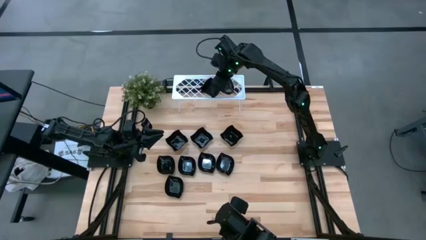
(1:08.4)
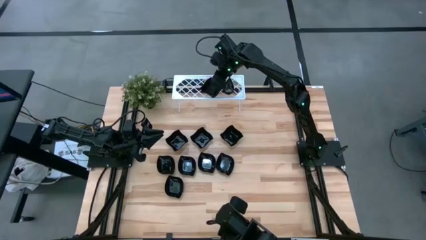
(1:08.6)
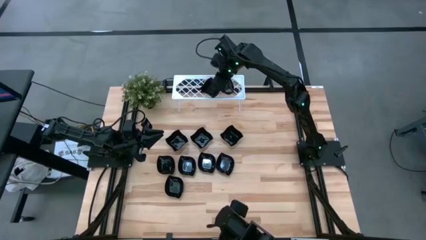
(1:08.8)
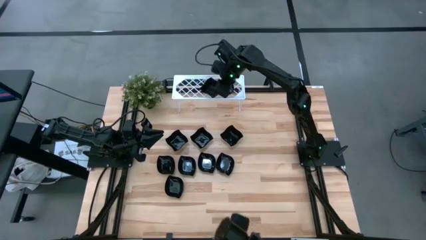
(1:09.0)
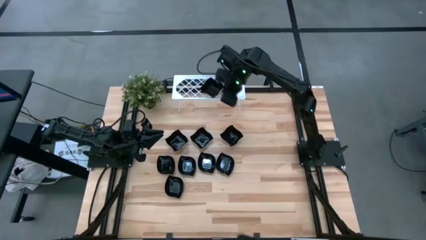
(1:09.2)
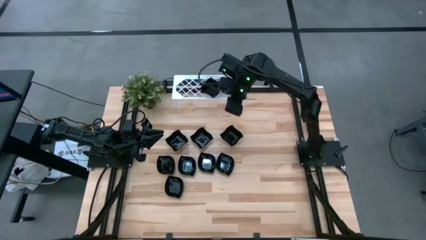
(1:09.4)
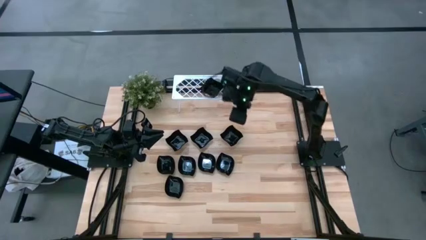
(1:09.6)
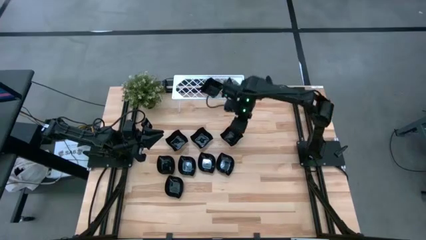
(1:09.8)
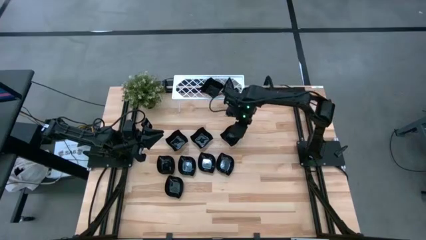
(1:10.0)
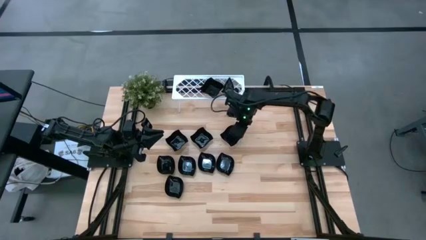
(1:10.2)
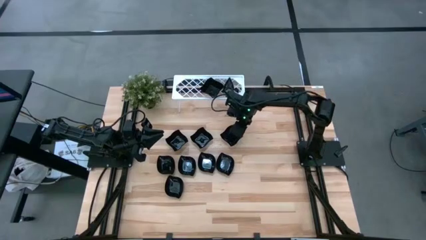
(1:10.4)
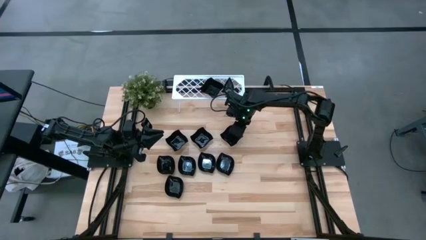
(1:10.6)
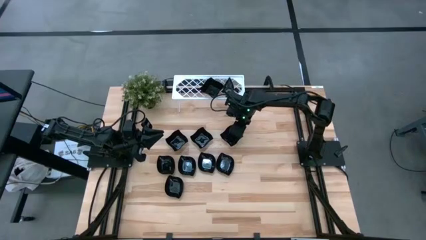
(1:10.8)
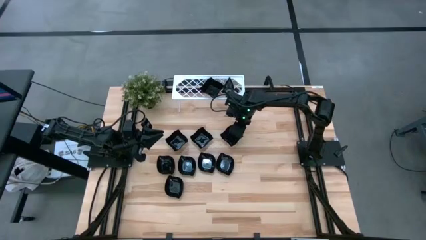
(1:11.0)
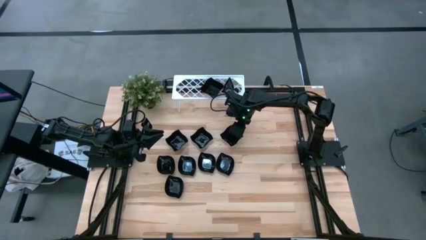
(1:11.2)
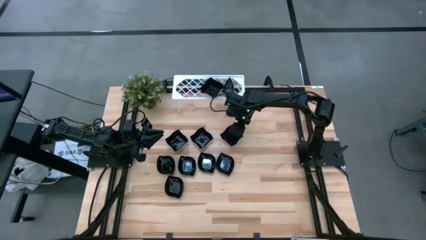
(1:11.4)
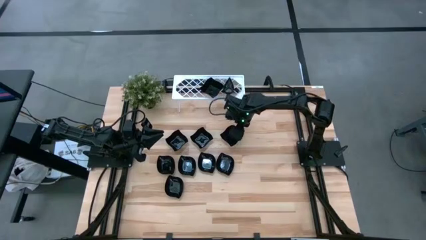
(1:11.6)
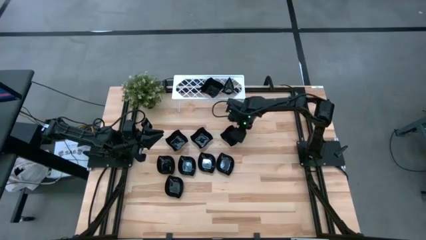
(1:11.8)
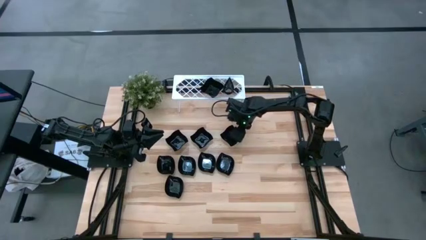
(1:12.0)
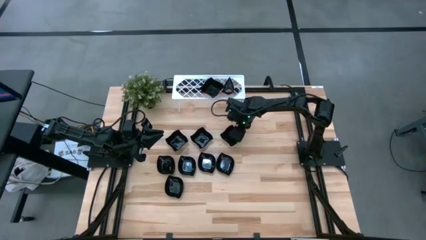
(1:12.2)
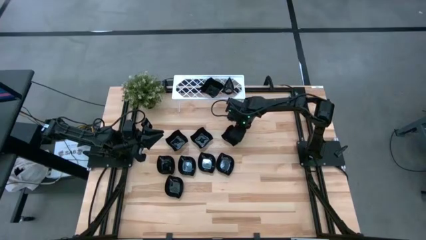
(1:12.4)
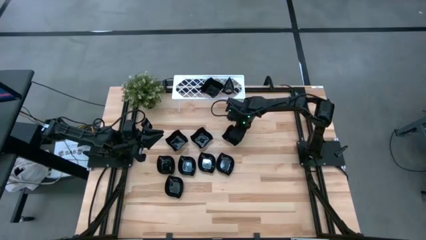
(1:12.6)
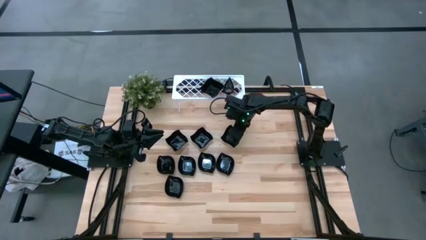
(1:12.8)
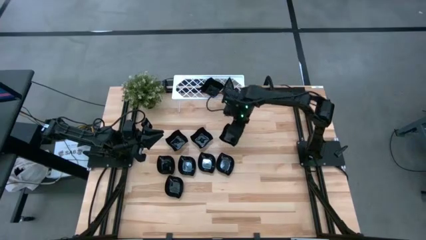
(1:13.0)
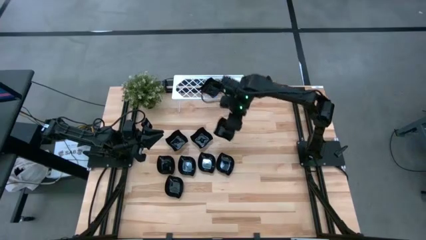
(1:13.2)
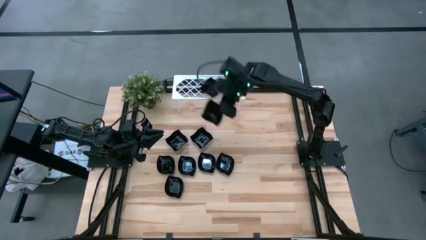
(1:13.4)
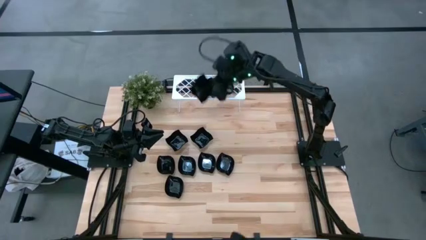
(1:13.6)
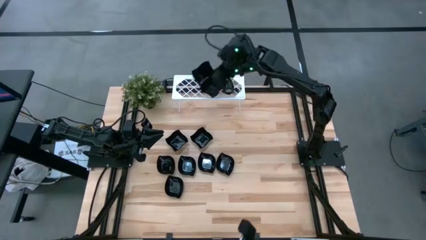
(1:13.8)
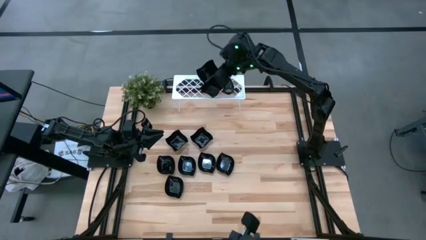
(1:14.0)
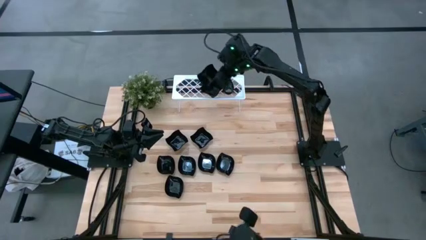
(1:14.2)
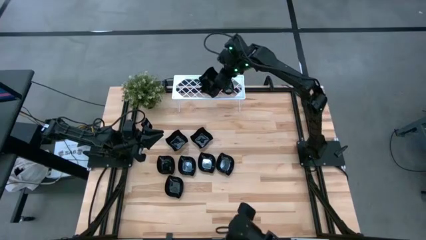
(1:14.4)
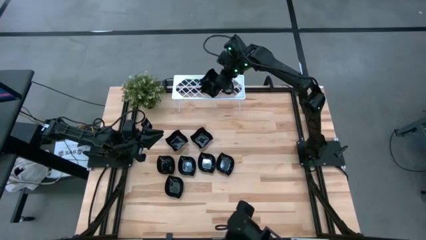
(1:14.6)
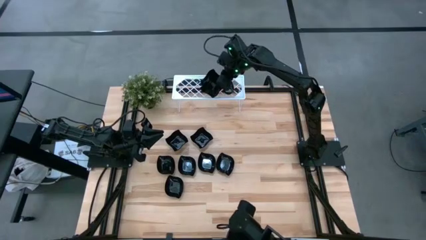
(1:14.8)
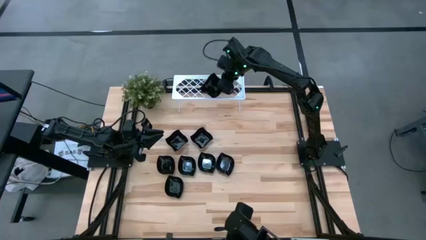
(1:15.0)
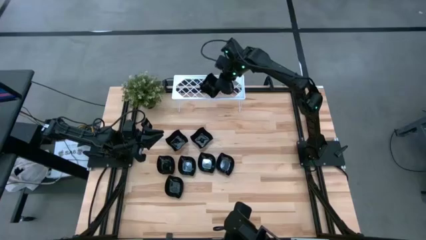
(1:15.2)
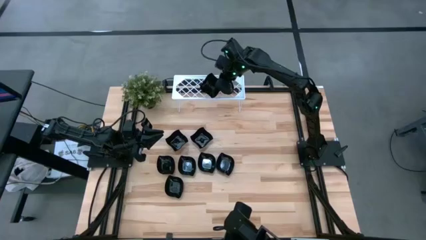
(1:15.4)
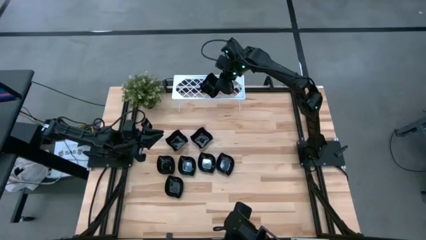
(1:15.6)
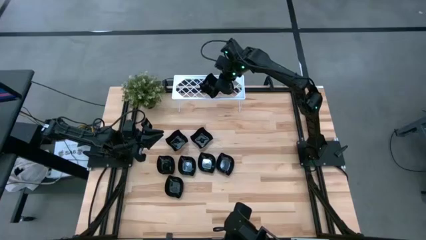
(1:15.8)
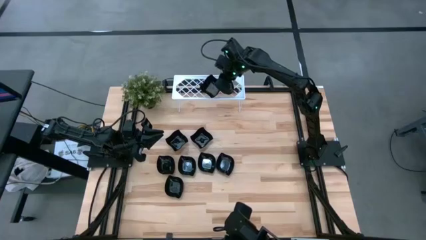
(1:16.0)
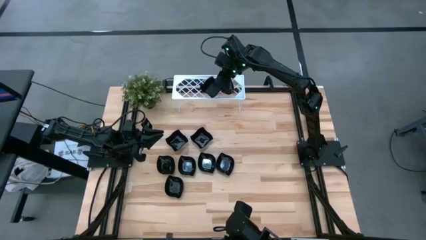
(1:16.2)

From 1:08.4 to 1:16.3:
Task: Pick & Place Mini shaped plates
Stack the distorted square plate on top of the distorted square plate on the shelf

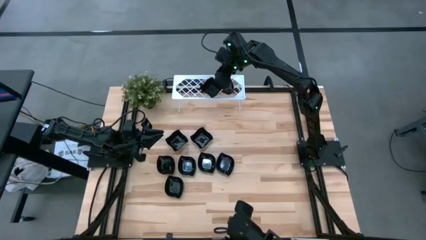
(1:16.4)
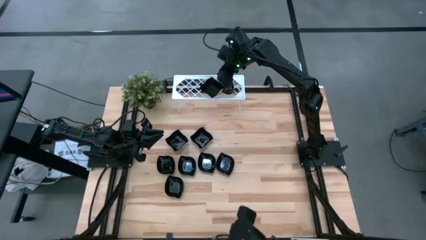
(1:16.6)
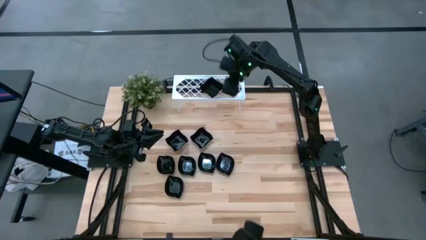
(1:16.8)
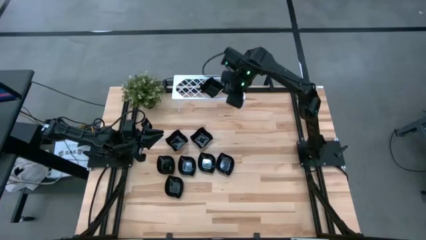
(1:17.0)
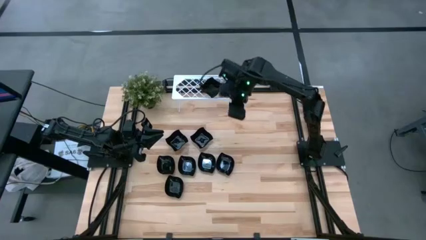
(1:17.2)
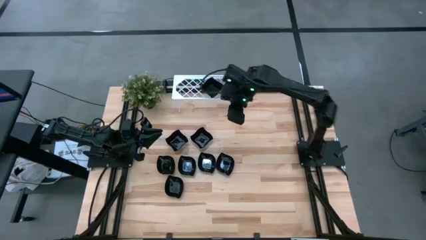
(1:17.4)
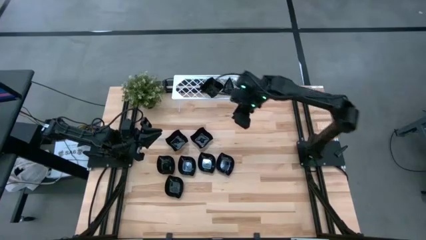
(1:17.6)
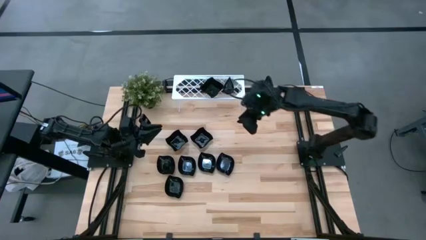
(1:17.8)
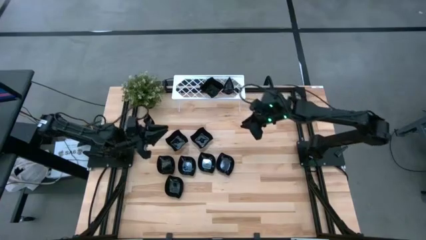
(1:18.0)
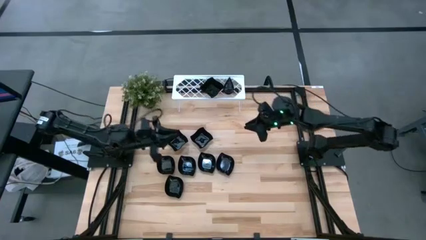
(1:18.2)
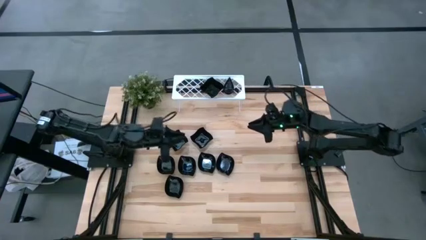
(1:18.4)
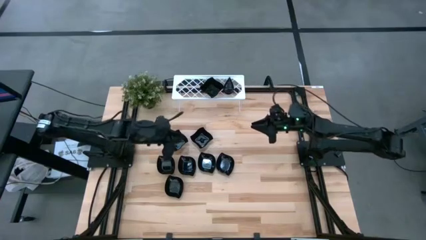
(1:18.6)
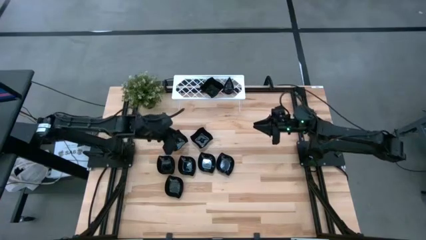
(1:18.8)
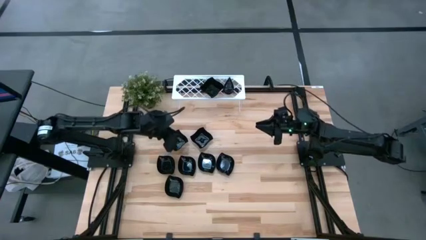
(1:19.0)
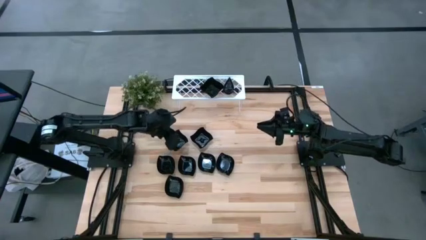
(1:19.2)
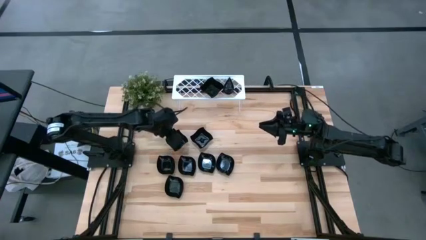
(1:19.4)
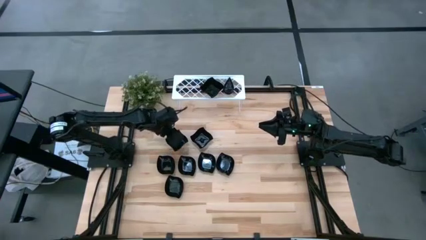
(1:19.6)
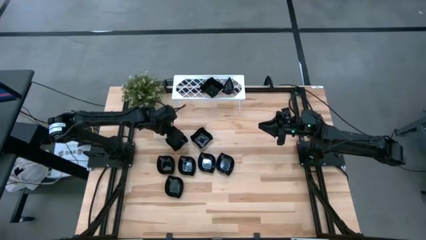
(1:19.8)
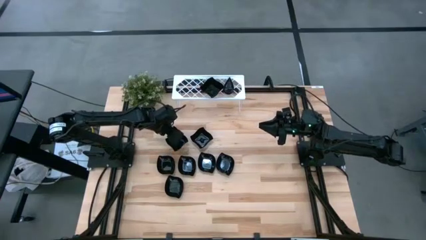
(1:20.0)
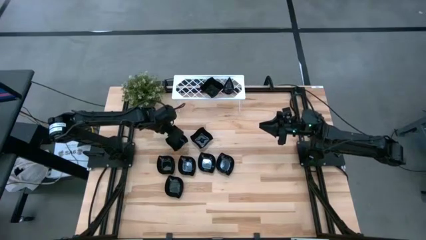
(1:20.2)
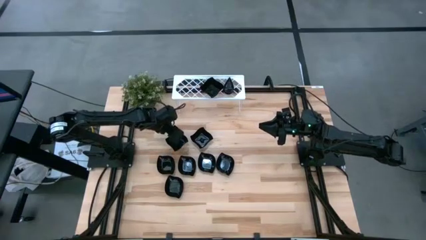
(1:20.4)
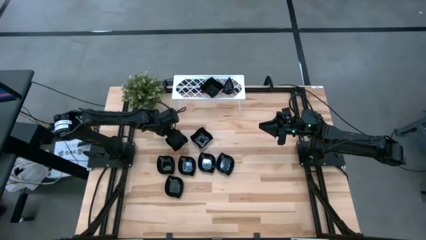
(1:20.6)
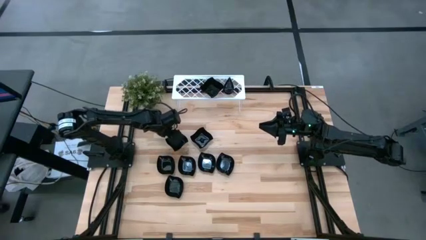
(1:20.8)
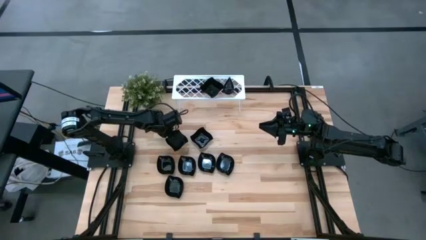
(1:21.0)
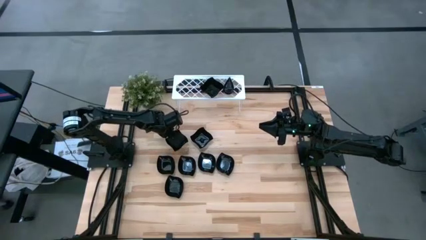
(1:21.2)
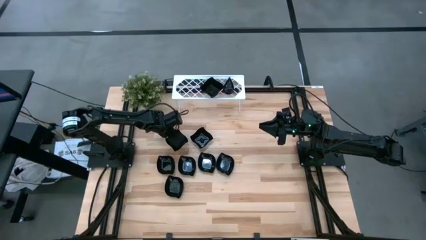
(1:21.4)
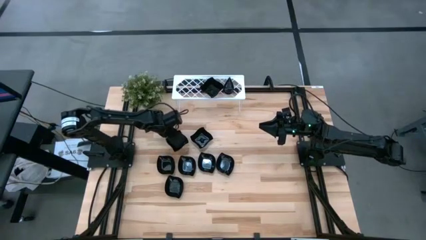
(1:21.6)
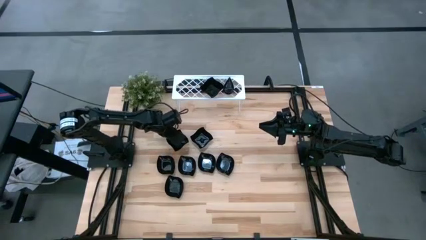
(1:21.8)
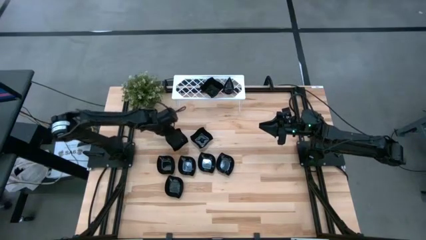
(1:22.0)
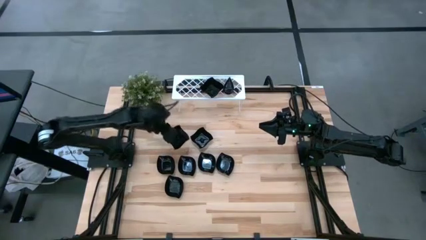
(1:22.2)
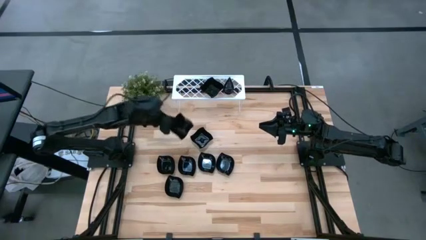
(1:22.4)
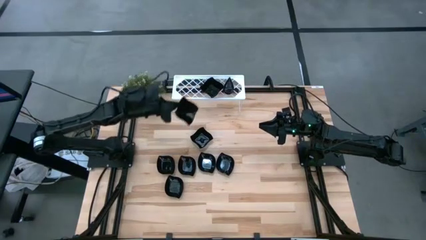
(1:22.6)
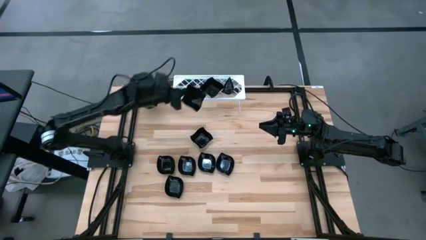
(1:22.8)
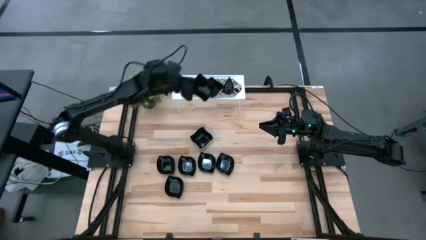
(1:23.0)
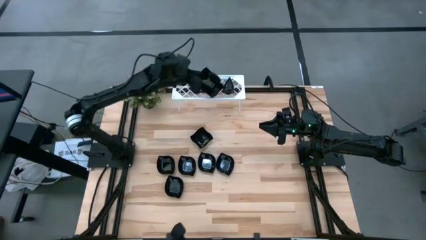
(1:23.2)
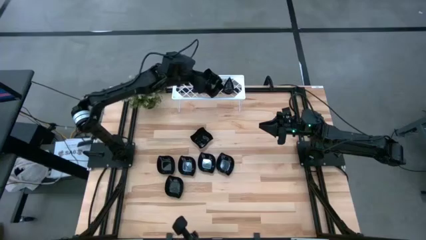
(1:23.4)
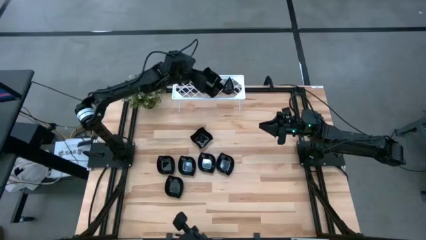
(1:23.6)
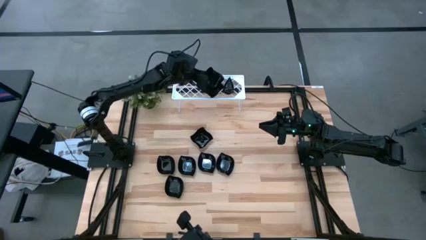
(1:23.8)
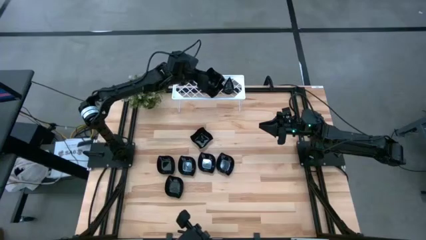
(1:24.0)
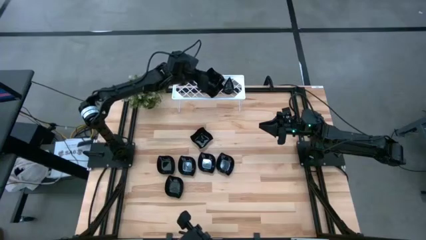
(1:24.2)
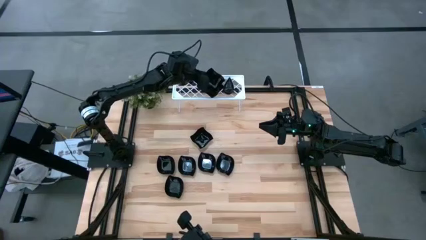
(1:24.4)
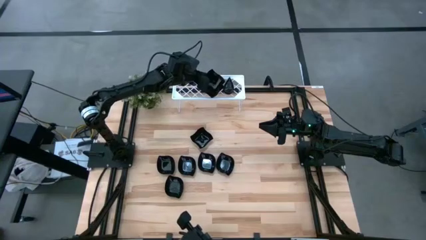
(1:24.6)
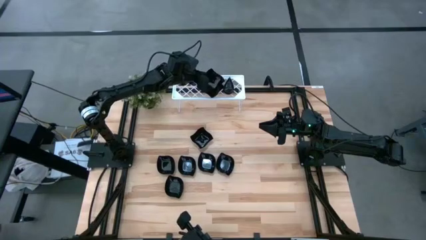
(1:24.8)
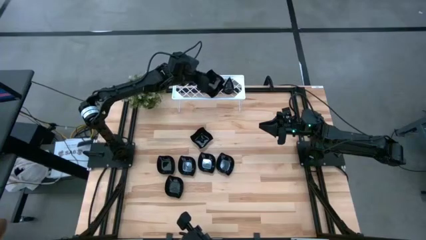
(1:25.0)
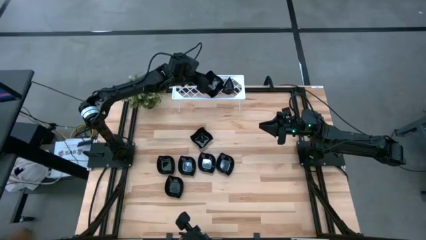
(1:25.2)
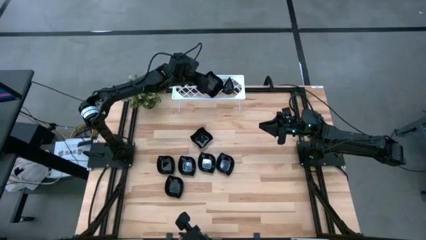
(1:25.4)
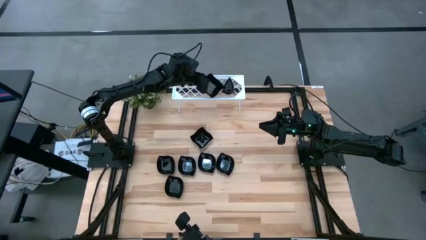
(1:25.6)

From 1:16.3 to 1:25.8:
Stack the distorted square plate on top of the distorted square plate on the shelf
